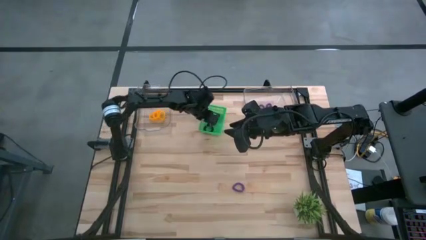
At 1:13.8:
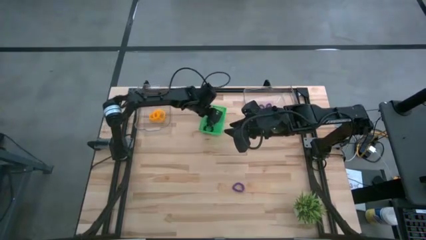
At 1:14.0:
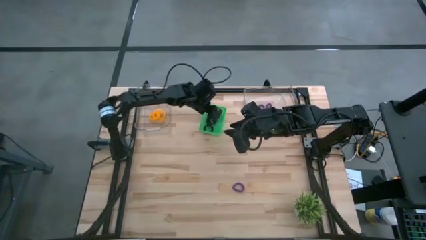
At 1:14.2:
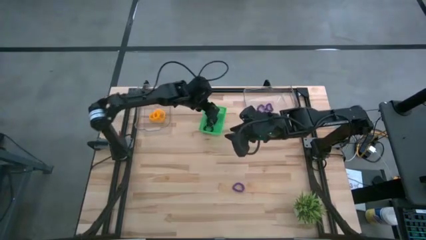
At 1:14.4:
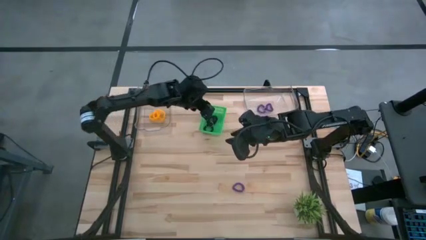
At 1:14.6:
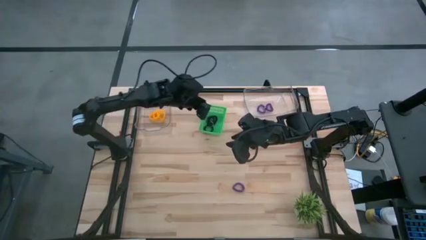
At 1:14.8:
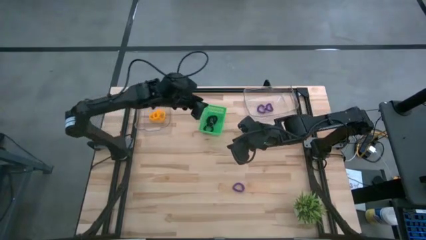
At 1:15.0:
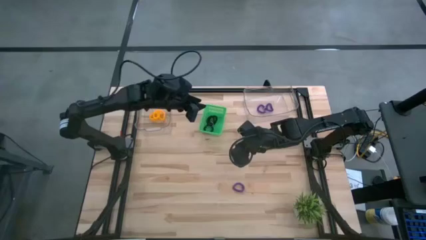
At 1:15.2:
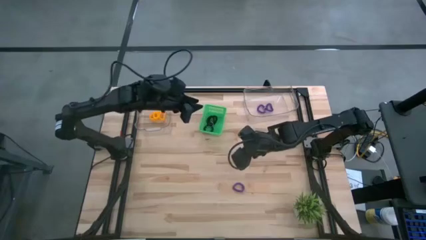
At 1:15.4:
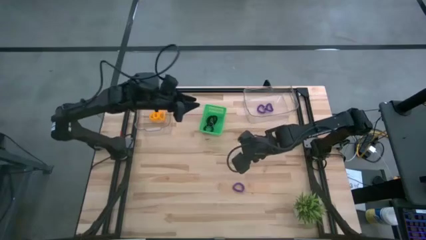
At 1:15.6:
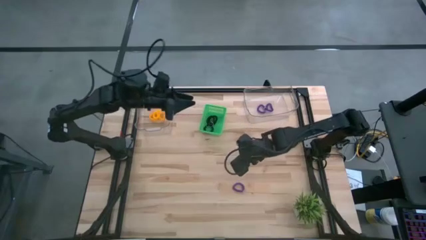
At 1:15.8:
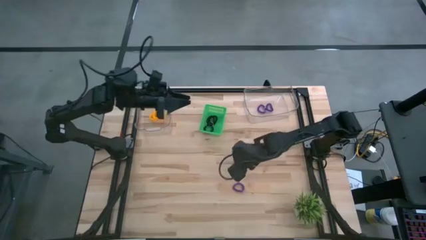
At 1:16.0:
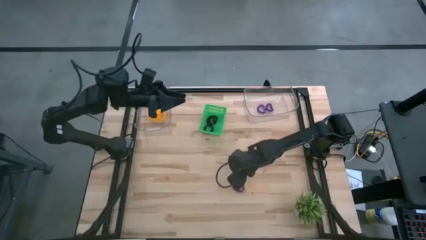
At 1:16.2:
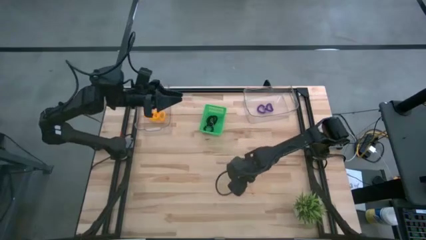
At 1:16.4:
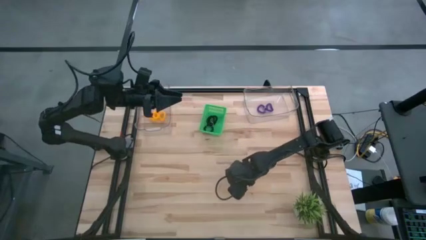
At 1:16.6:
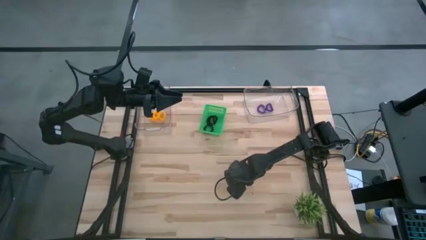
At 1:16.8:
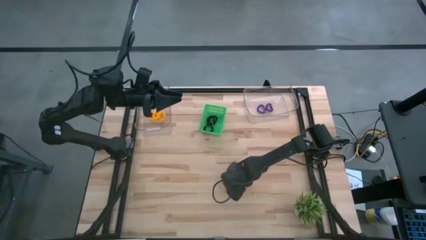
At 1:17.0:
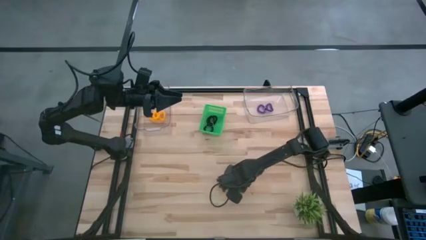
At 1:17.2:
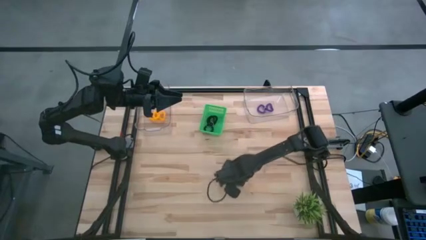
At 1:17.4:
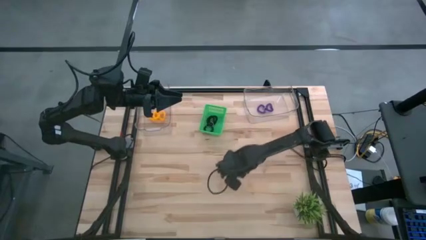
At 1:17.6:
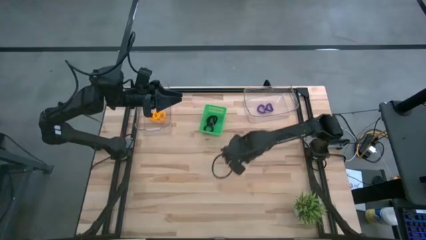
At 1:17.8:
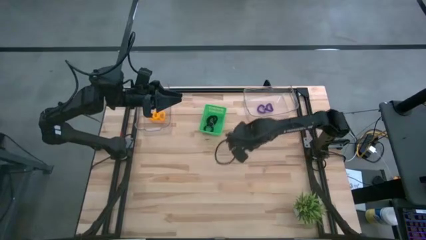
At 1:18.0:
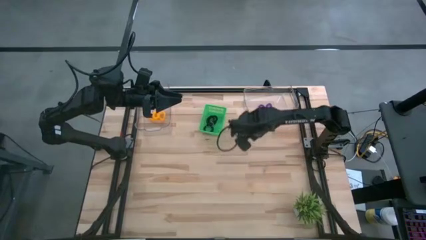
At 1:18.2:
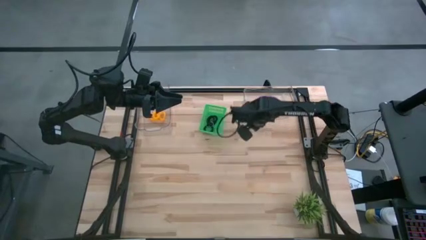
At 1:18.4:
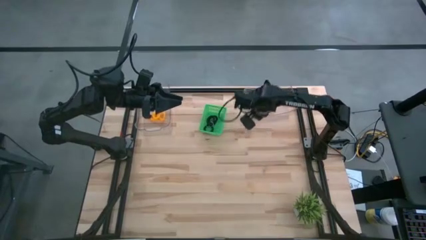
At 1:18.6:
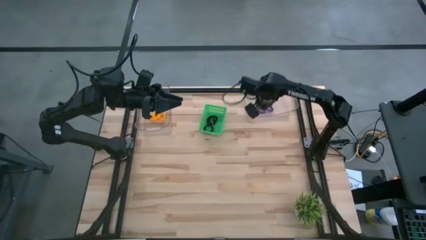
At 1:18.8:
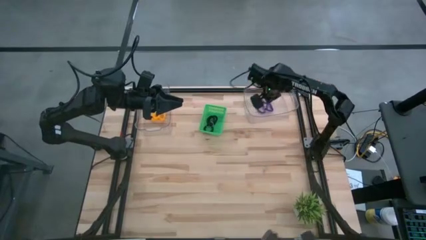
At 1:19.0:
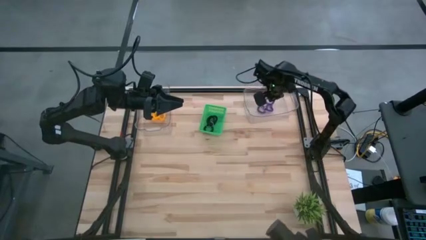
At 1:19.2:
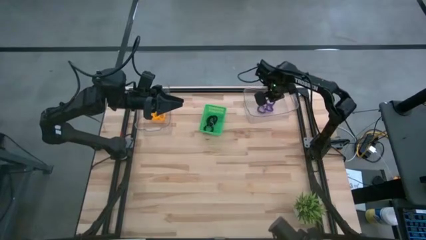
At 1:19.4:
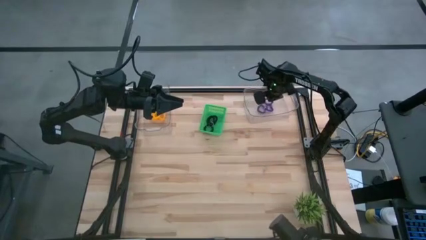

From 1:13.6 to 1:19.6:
Task: Sort spring keychains
Put the purple spring keychain into the right transparent bin

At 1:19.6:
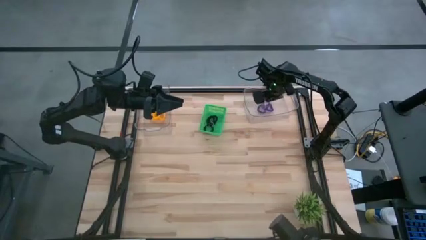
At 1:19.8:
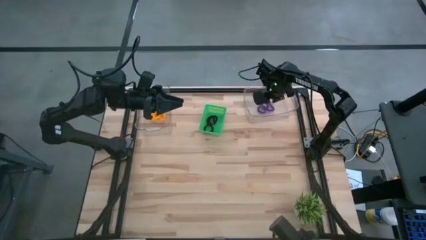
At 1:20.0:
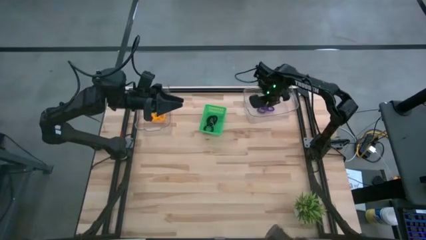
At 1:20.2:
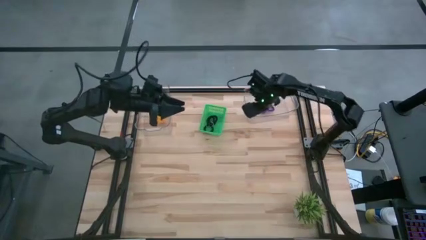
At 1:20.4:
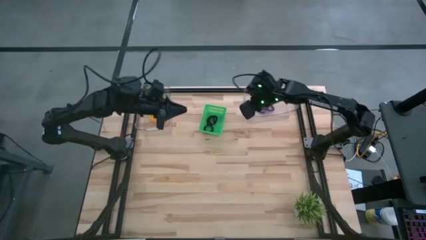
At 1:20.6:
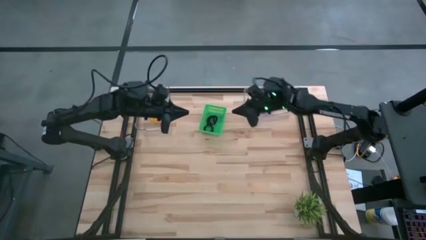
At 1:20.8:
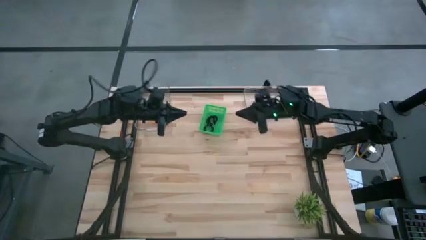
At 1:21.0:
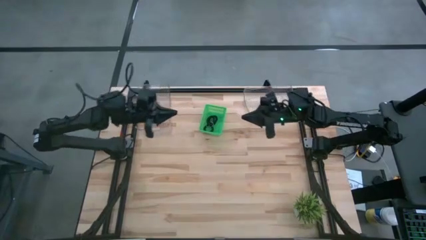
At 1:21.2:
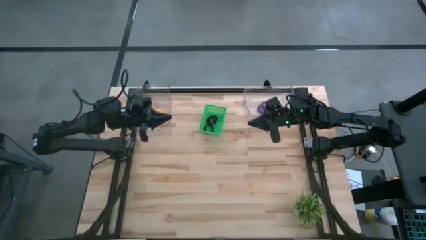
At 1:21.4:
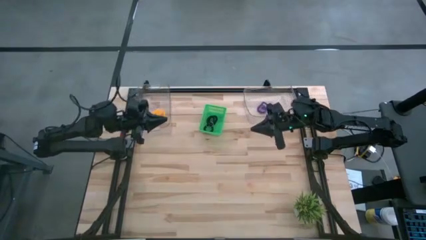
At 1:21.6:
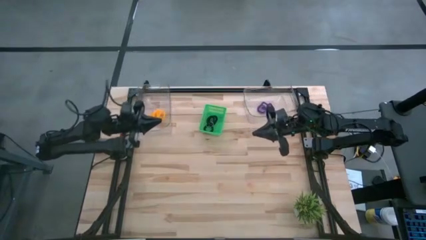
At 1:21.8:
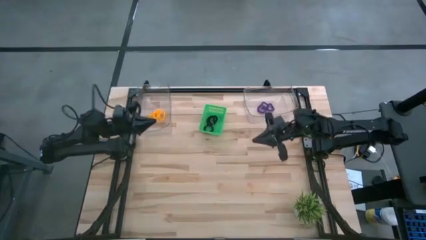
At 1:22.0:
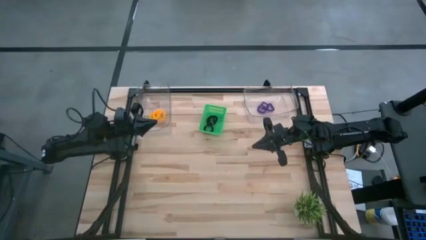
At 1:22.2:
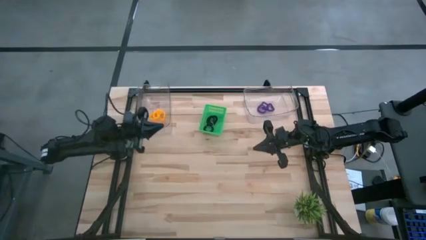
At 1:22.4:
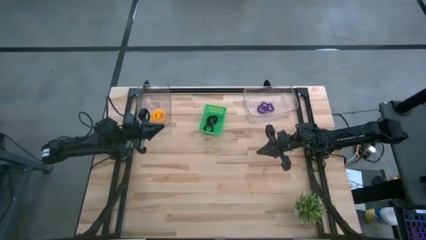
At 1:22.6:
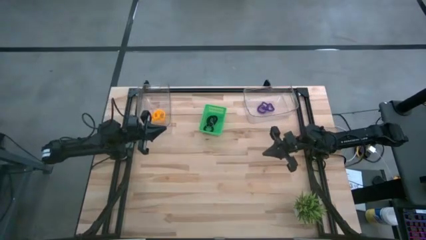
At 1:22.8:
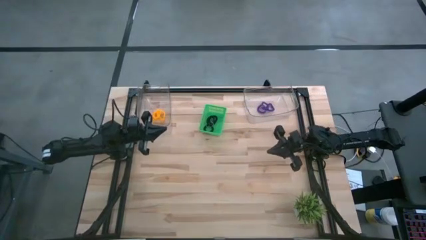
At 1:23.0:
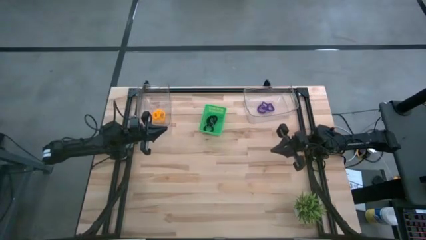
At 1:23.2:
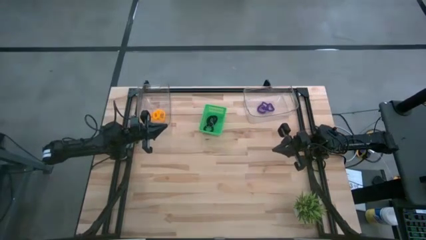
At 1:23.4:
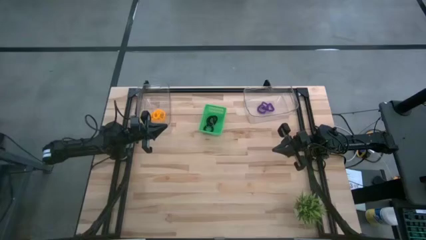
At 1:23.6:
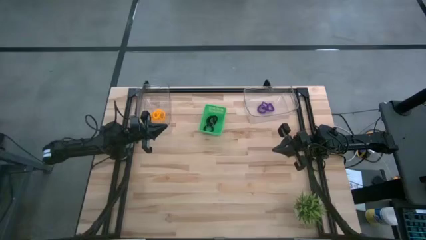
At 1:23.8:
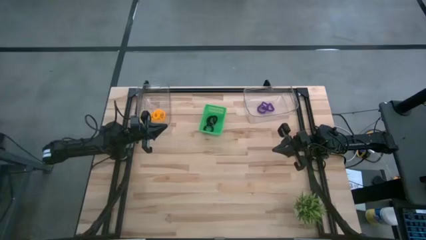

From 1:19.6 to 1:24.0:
Return to Home Position

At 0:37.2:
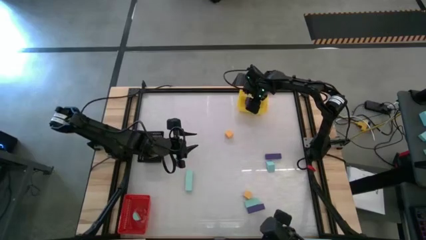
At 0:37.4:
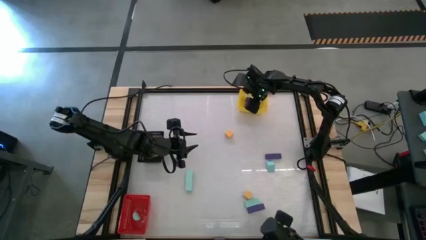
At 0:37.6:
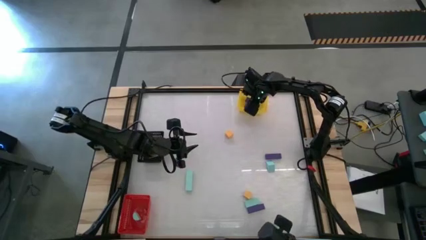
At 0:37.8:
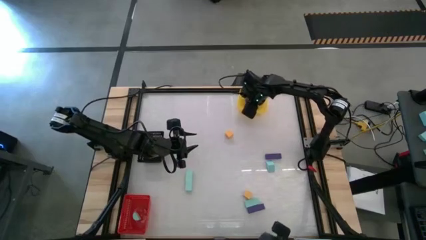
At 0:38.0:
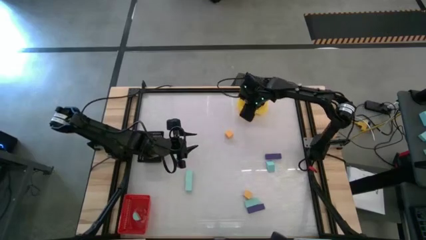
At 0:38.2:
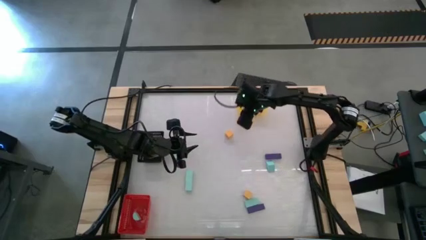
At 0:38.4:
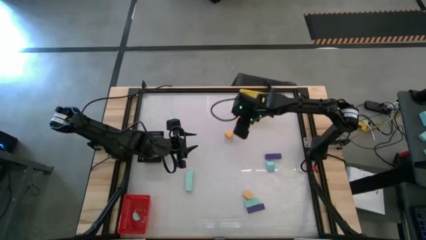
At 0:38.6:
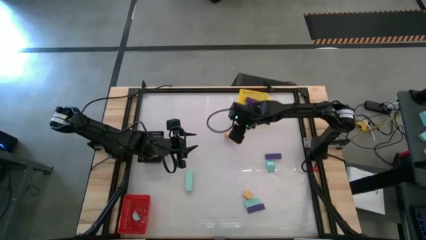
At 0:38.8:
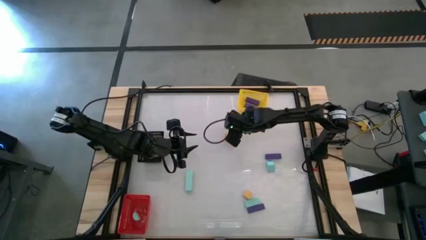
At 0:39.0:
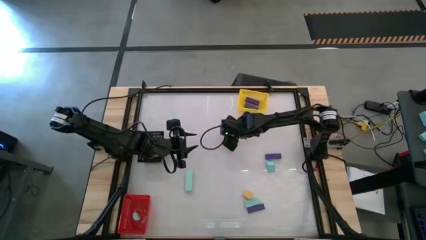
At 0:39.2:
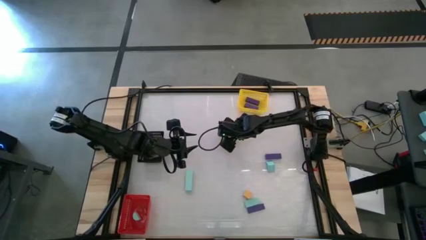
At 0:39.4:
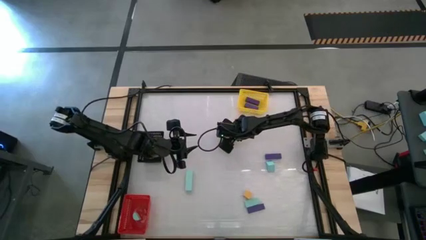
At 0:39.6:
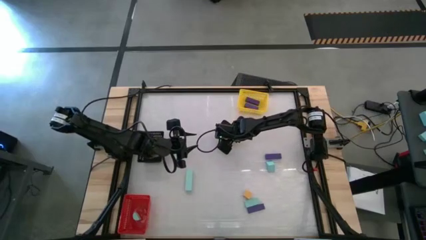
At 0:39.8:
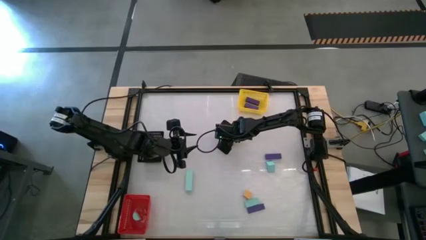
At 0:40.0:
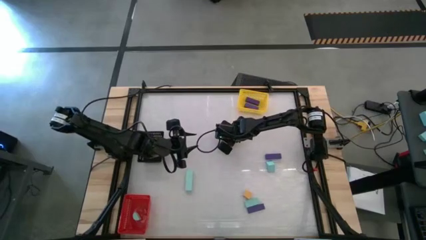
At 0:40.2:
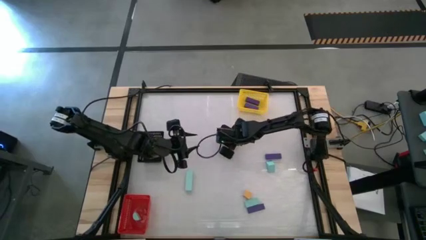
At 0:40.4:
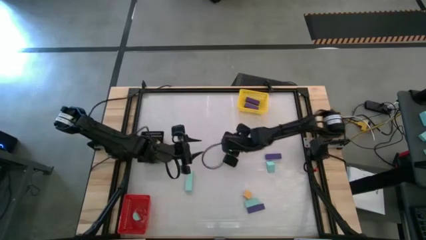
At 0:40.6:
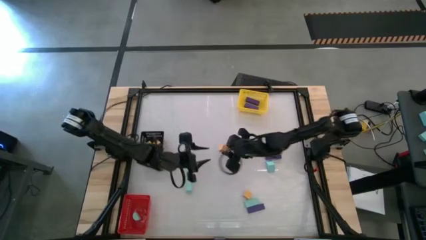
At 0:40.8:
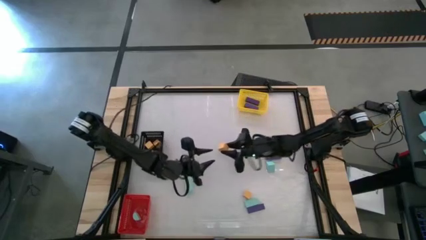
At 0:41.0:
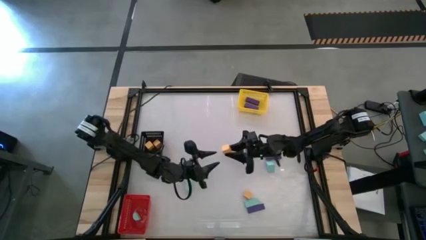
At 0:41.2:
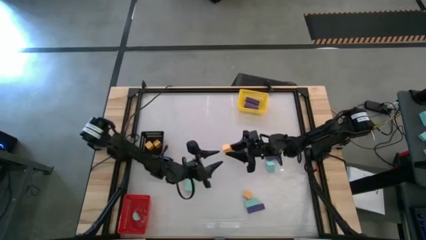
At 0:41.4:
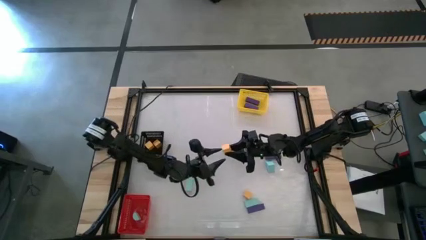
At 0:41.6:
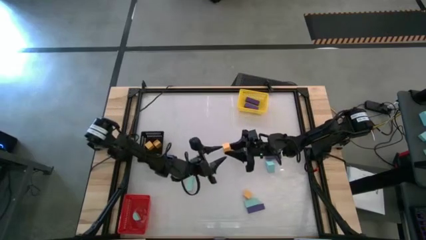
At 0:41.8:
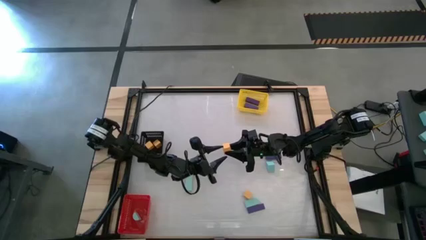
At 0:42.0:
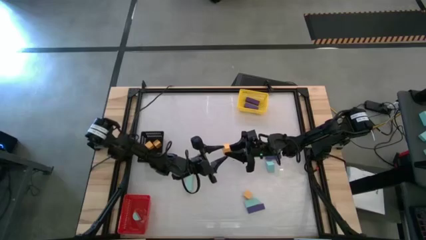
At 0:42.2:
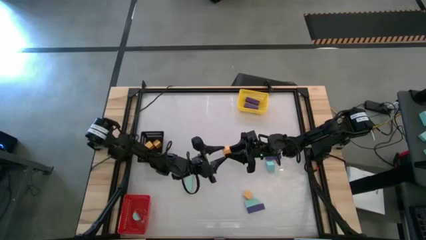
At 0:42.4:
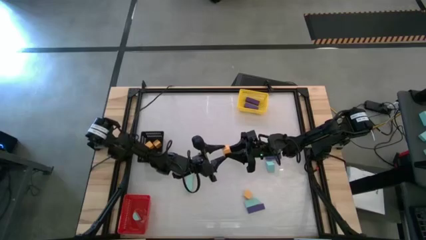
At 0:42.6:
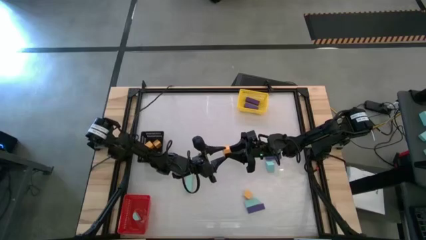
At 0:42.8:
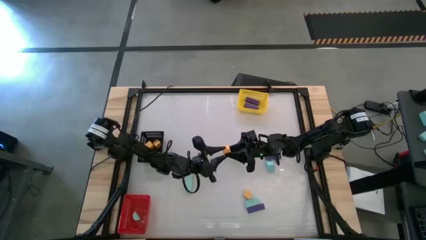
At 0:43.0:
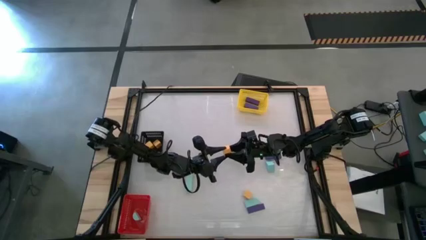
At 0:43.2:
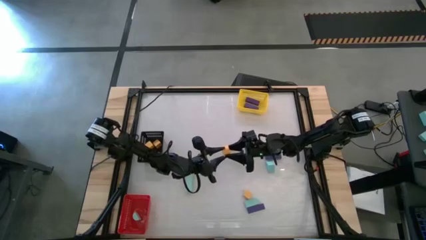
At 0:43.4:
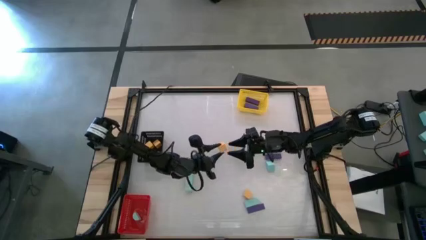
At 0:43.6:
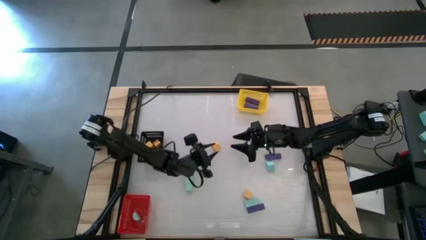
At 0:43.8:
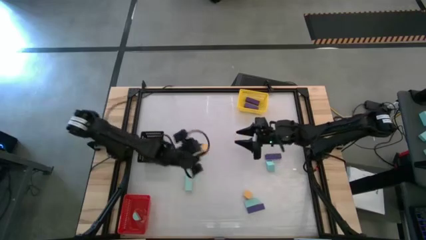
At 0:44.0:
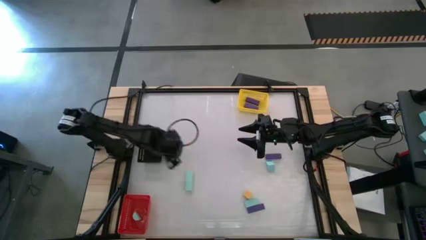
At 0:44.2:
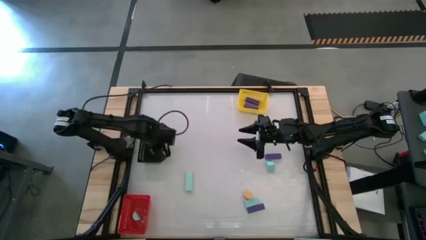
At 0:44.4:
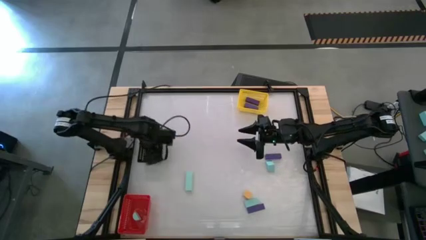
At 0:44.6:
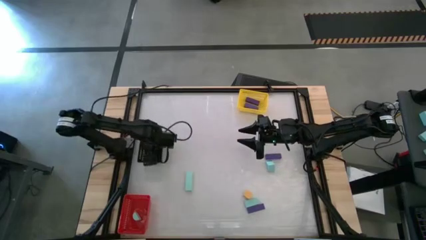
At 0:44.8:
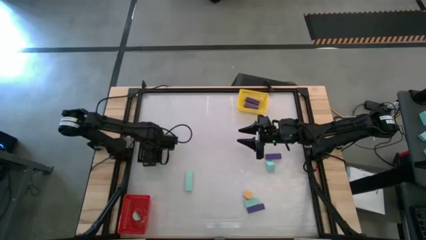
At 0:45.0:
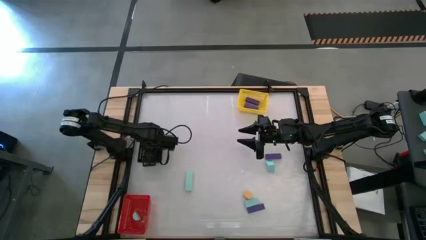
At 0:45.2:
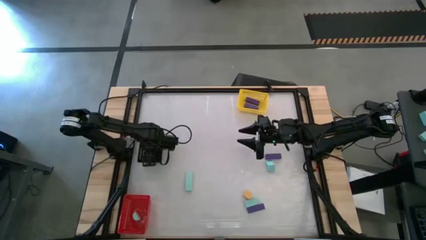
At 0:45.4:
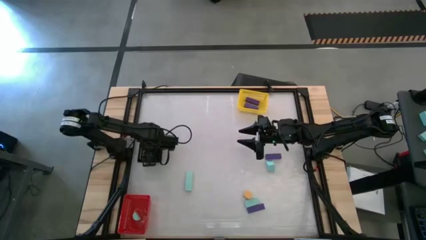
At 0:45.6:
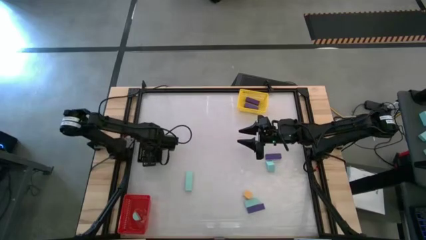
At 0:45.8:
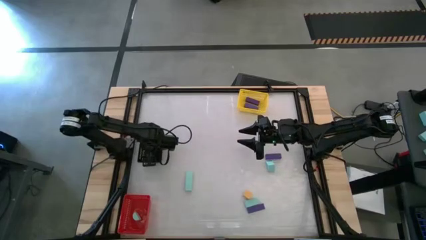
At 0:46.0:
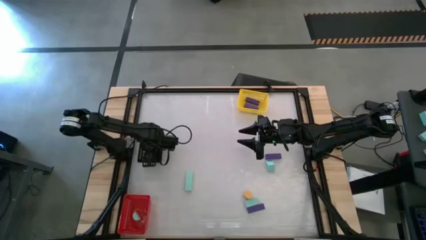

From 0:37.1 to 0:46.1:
Task: Sort & place blocks by color
Put the yellow block into the black bin
